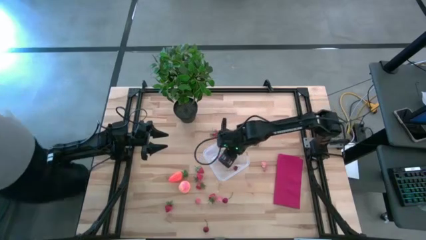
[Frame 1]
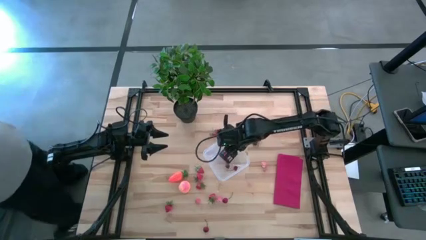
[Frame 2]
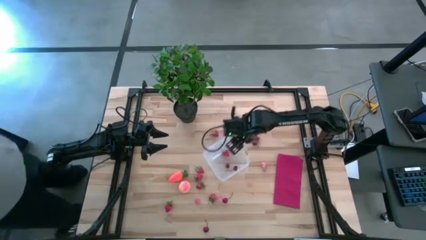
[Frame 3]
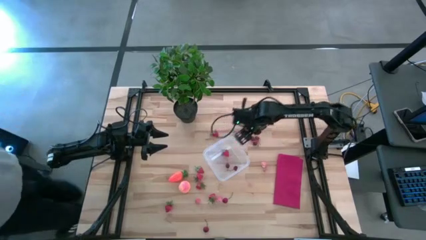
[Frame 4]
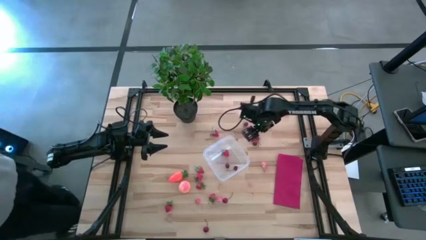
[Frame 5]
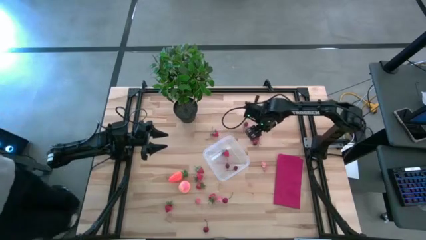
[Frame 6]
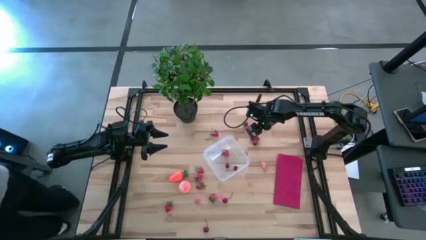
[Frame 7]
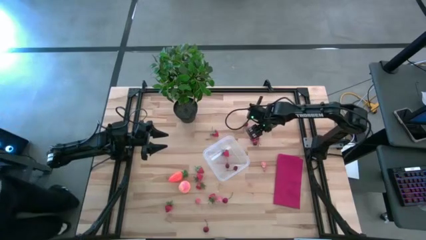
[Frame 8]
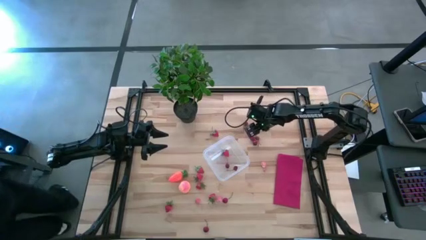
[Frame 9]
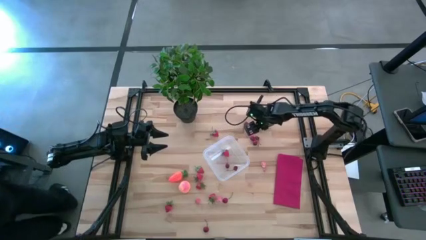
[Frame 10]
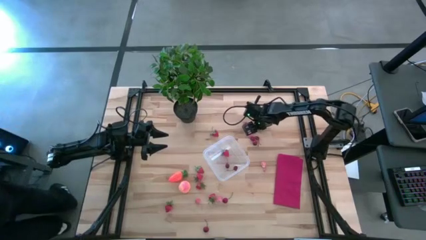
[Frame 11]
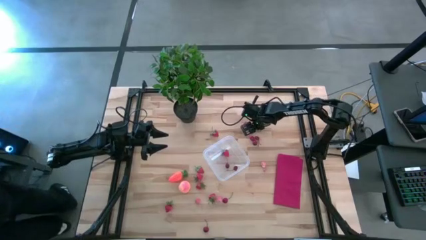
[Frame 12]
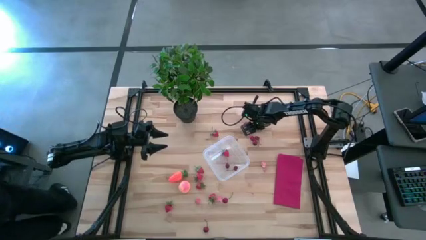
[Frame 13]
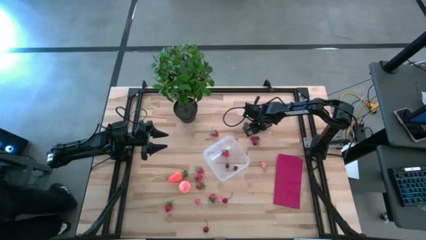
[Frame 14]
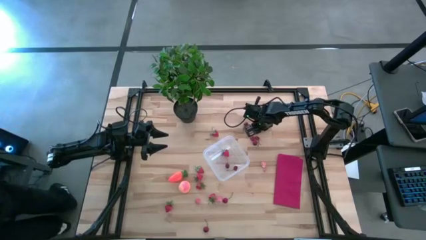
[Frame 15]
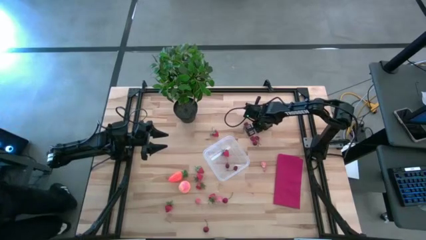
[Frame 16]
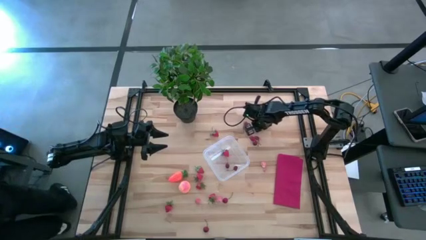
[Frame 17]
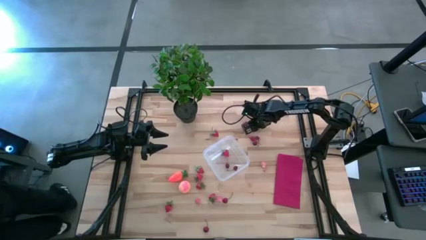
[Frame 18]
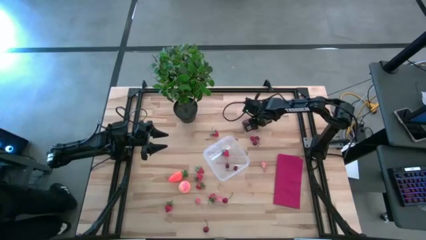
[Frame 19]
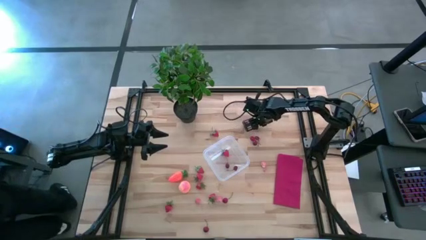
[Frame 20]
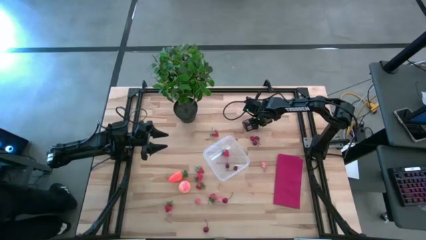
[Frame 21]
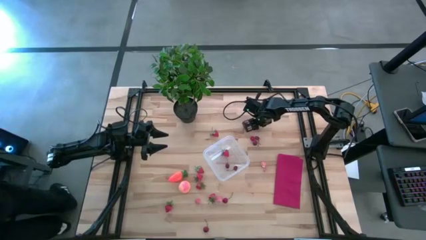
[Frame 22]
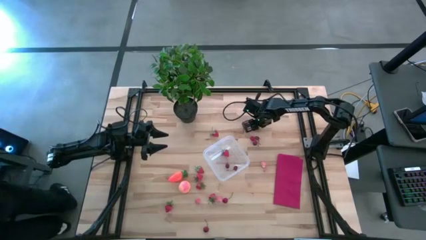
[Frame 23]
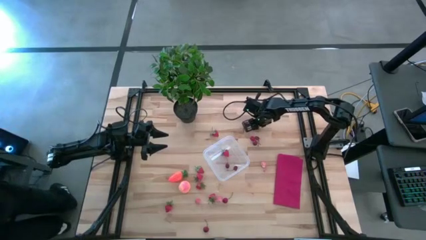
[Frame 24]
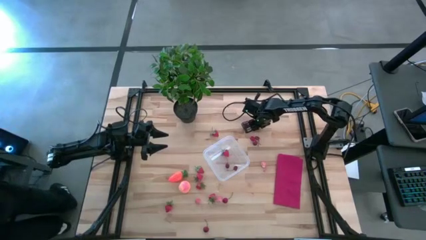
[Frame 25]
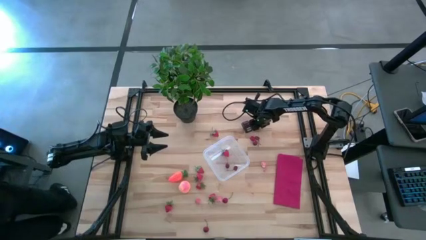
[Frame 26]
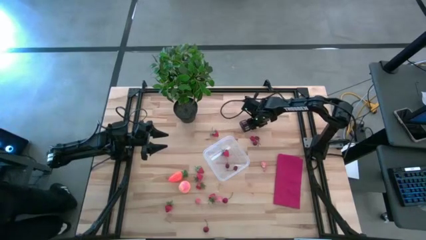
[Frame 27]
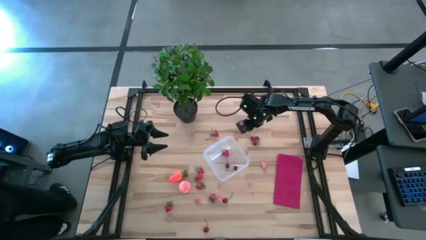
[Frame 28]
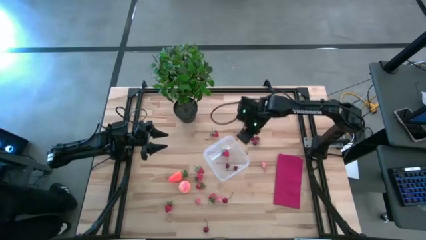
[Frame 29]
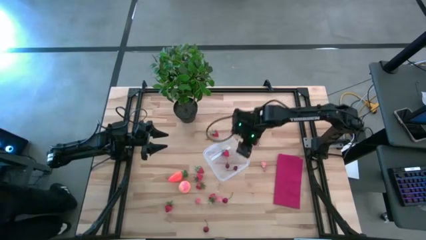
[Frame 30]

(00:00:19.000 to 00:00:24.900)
Task: Pick and placing Produce into tupperware
Put the blackberry into the transparent bin

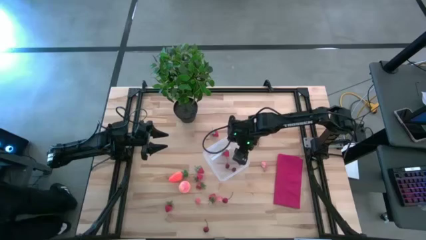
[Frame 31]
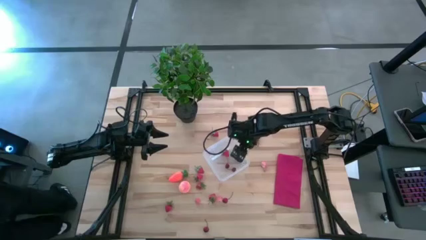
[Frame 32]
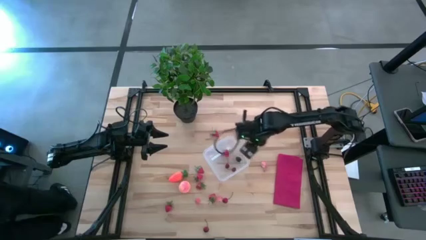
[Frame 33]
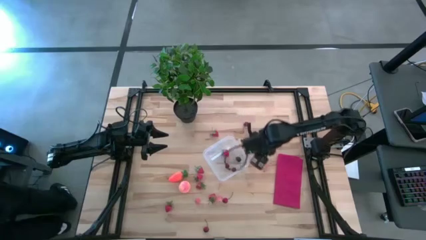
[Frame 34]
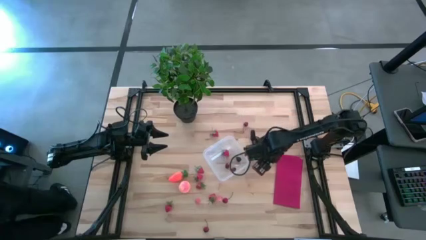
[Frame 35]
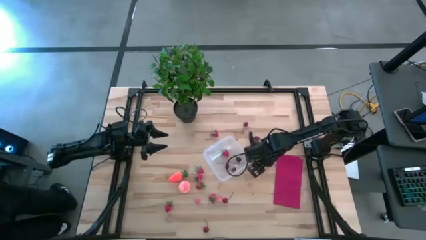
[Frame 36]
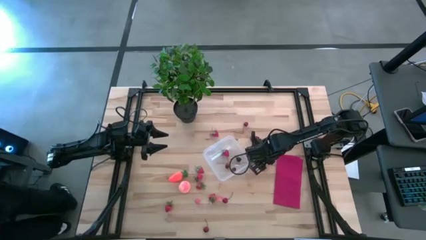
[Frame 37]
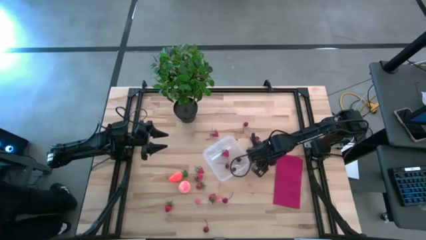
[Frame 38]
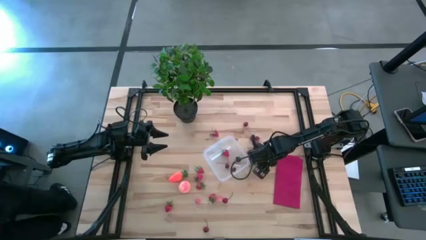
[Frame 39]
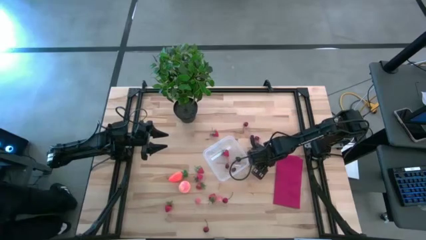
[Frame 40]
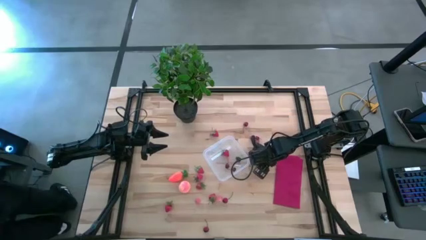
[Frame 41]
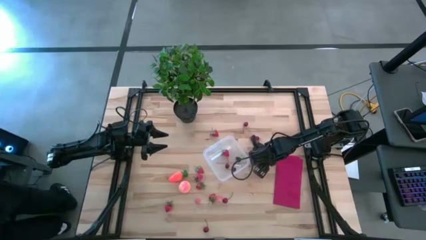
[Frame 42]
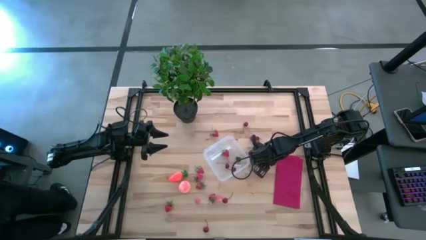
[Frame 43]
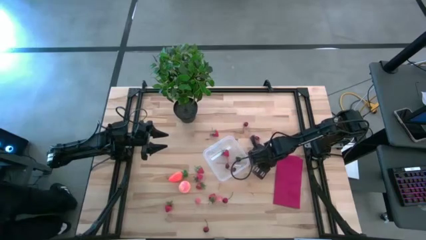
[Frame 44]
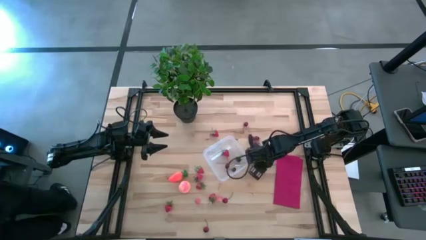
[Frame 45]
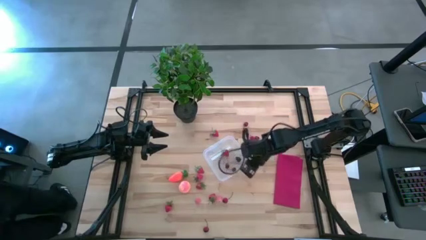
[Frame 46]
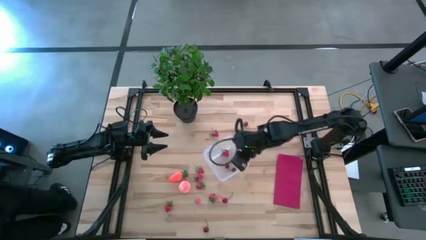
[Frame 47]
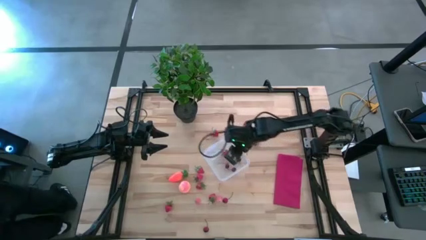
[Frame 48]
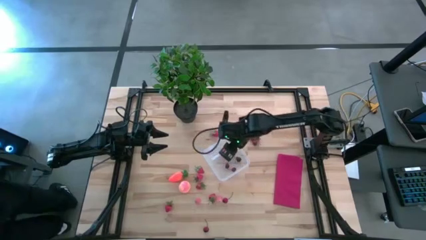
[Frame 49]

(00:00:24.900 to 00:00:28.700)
Put the pink peach into the transparent bin

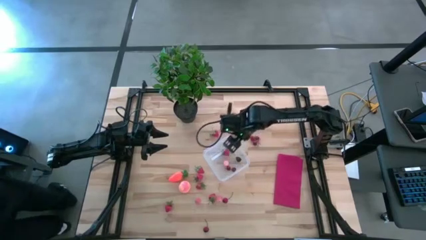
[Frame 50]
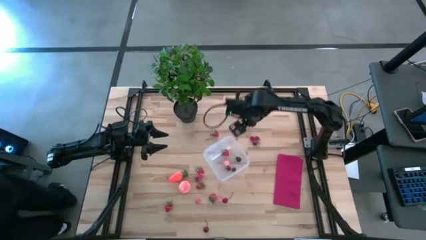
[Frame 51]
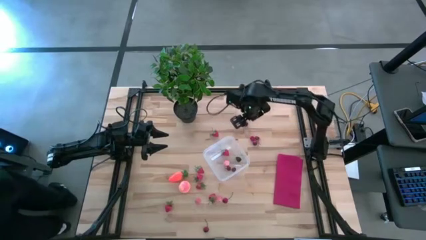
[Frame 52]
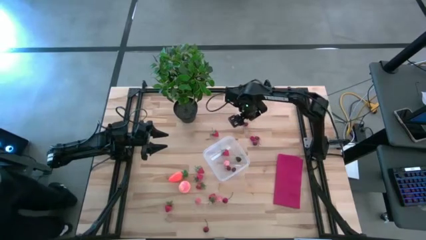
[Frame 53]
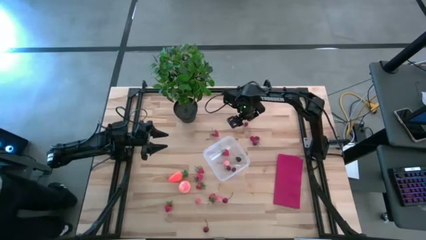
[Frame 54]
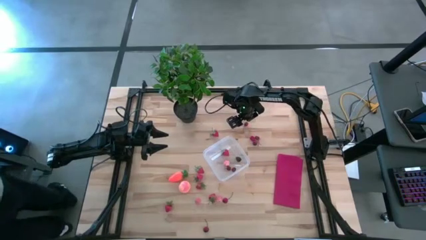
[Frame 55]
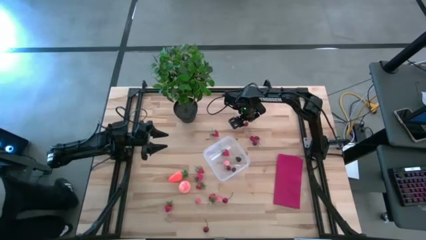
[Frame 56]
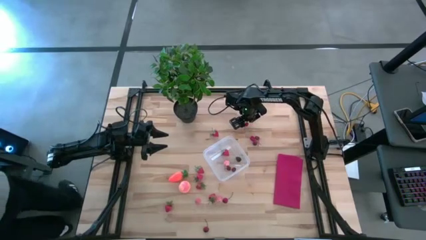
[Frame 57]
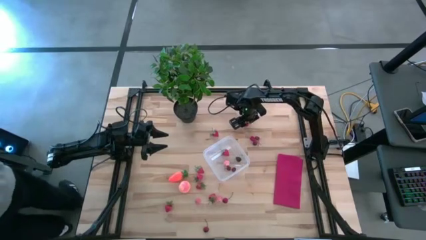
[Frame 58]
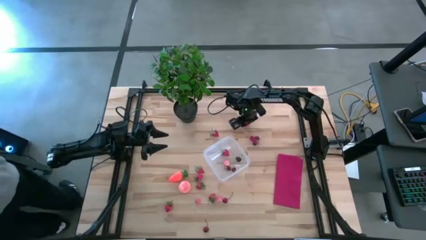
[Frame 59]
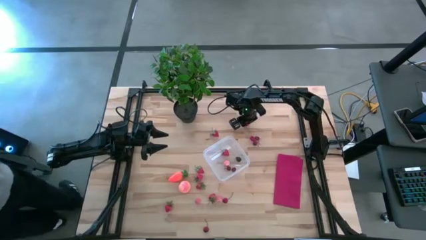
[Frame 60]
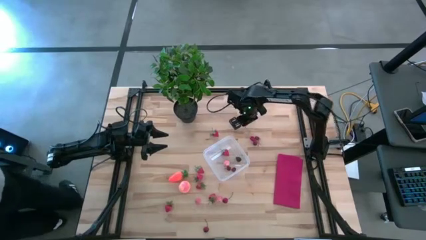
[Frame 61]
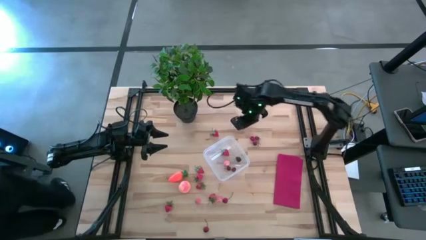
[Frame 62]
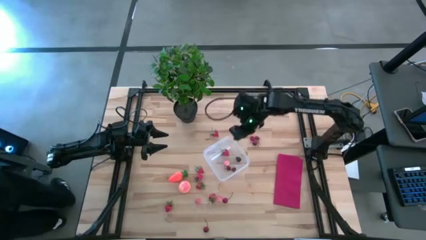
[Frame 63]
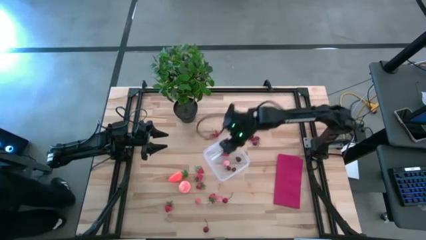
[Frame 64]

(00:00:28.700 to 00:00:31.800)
Put the red cherry into the transparent bin

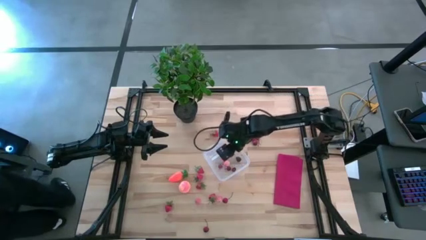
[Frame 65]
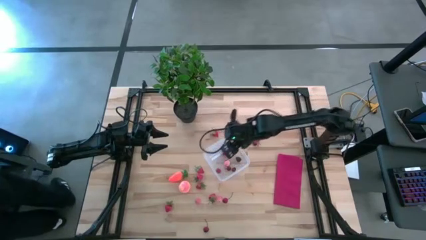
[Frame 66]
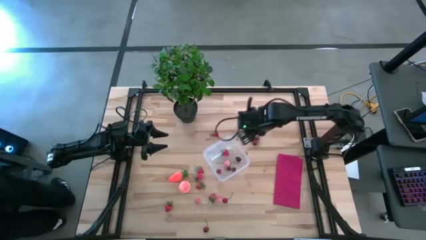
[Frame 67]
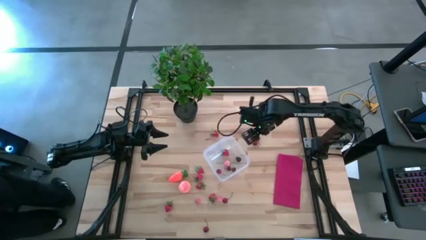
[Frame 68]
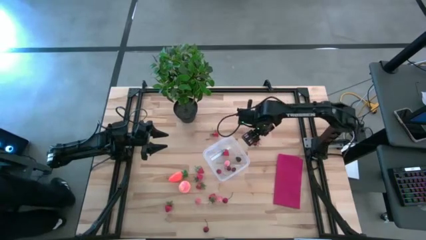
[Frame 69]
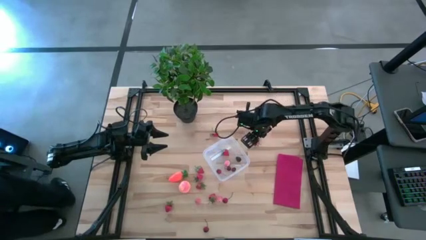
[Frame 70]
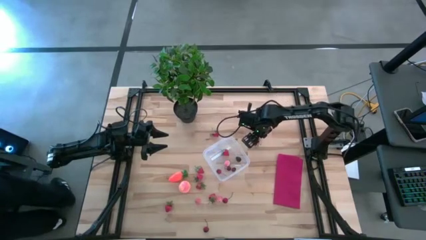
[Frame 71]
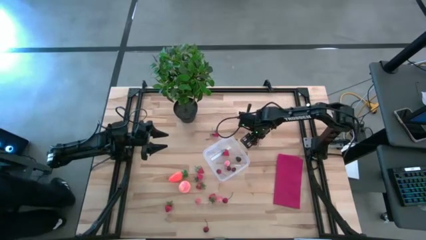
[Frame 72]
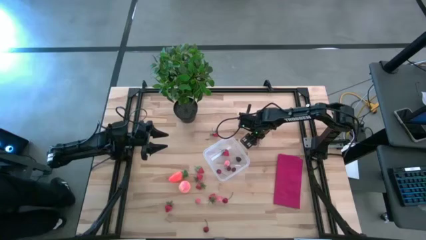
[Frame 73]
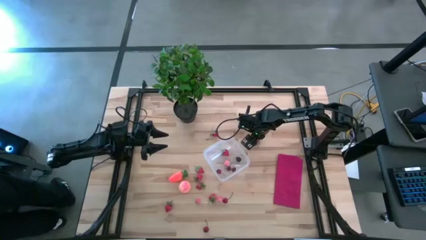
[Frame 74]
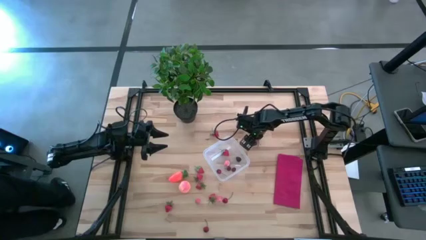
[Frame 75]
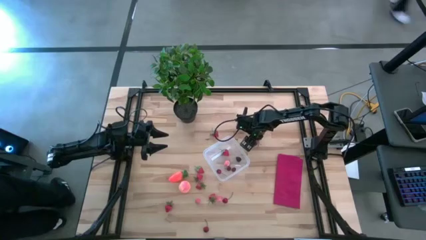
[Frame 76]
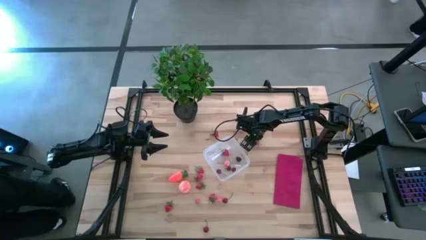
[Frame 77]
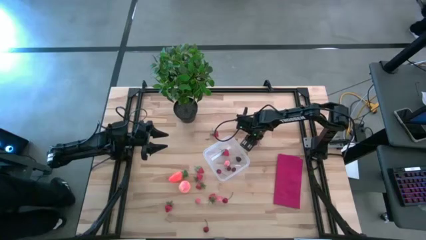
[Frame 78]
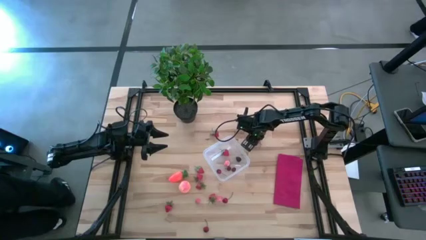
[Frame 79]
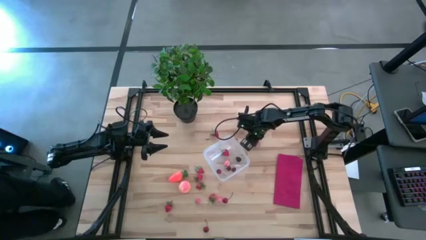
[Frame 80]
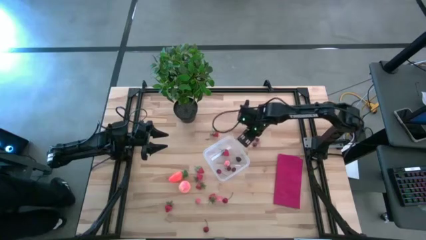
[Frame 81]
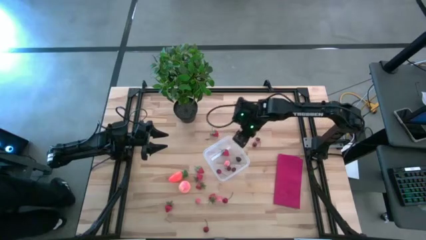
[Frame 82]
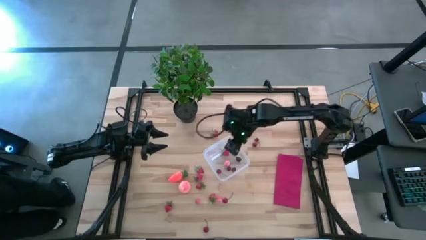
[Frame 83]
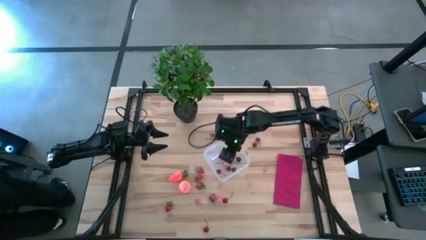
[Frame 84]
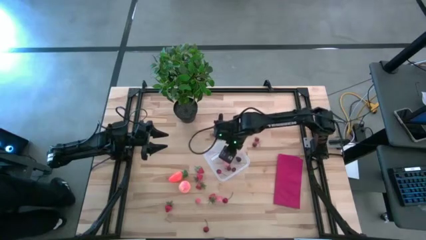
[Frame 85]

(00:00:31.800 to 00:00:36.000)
Put the red cherry into the transparent bin
